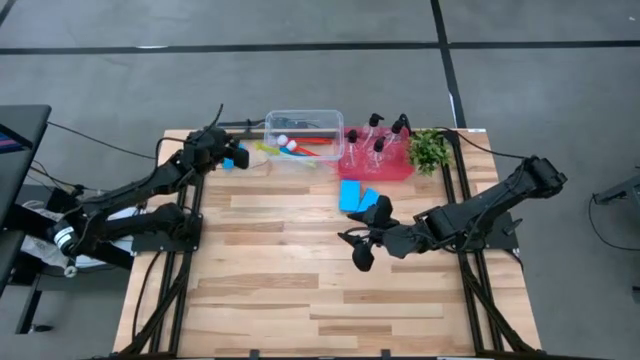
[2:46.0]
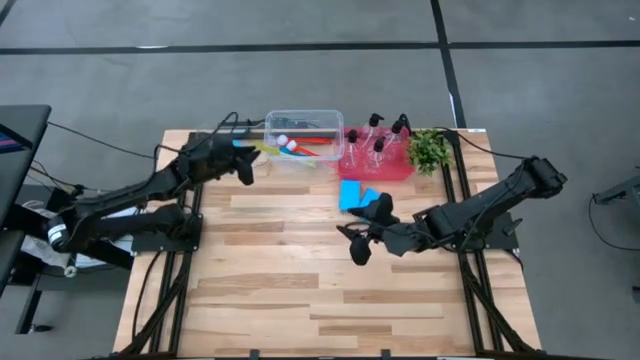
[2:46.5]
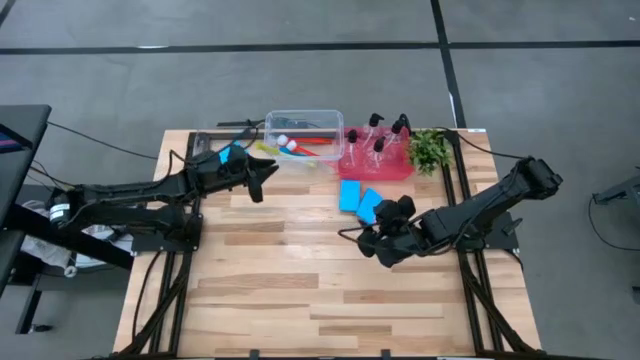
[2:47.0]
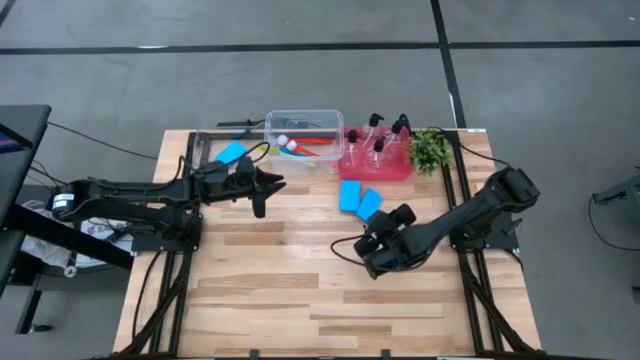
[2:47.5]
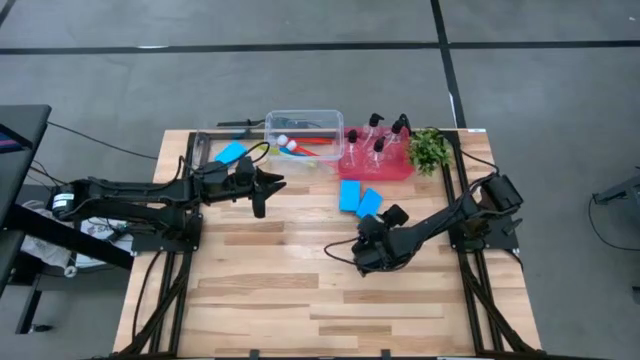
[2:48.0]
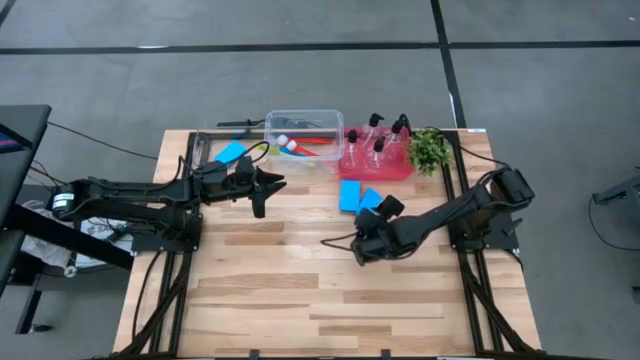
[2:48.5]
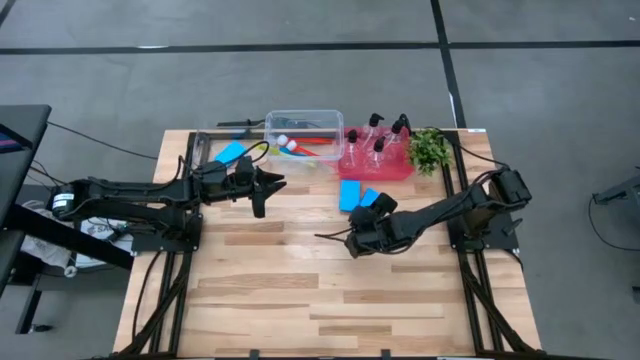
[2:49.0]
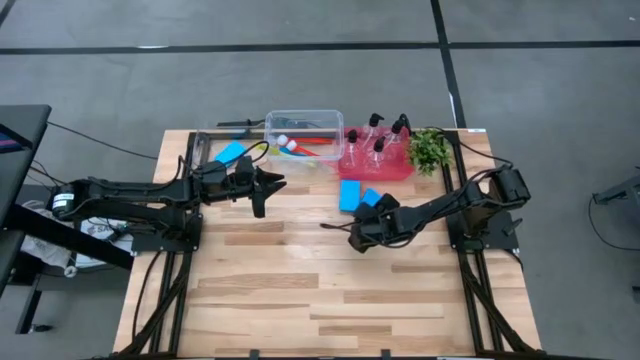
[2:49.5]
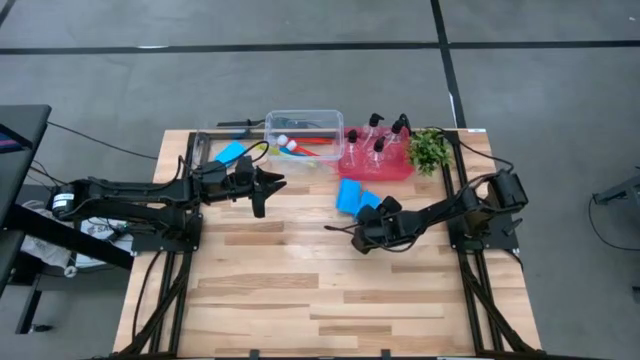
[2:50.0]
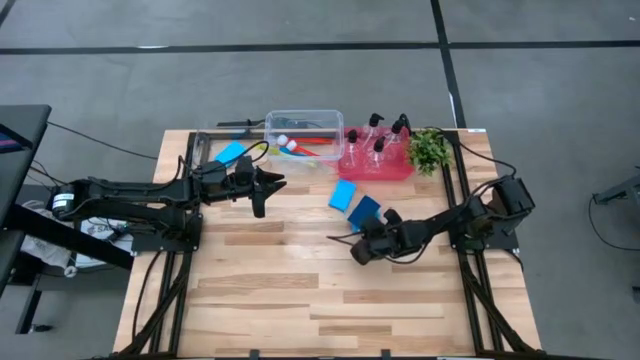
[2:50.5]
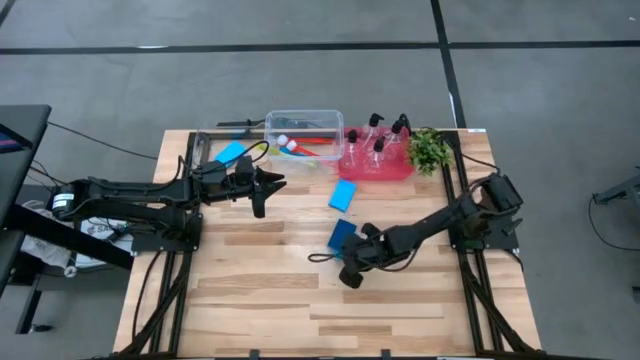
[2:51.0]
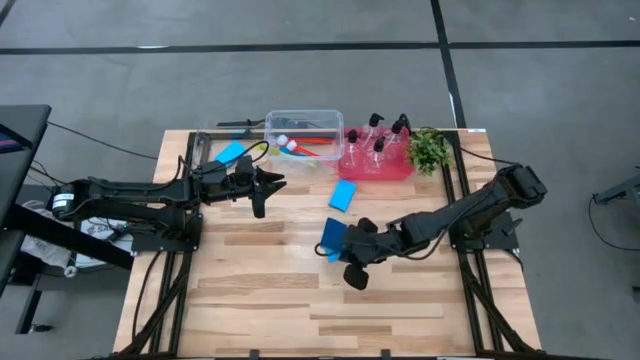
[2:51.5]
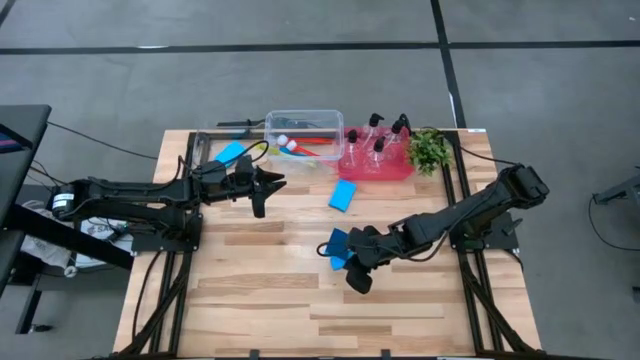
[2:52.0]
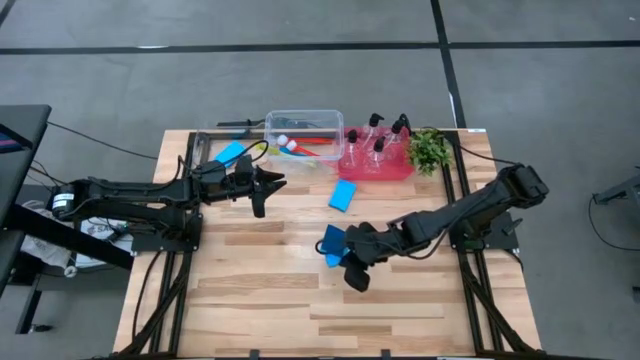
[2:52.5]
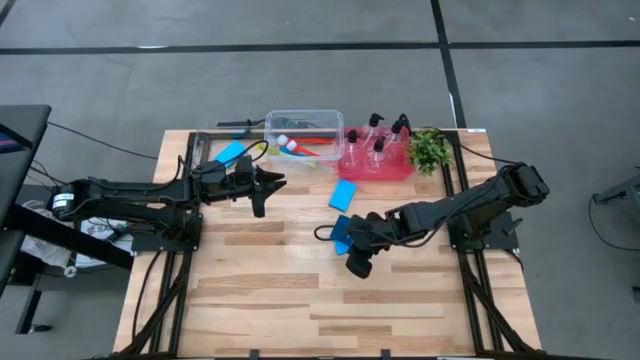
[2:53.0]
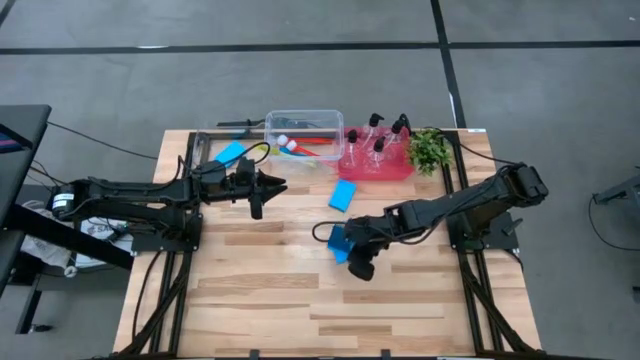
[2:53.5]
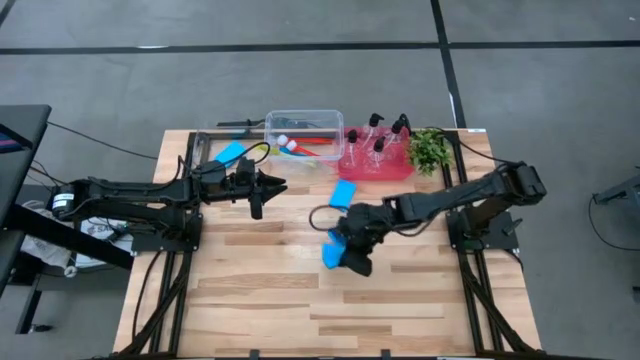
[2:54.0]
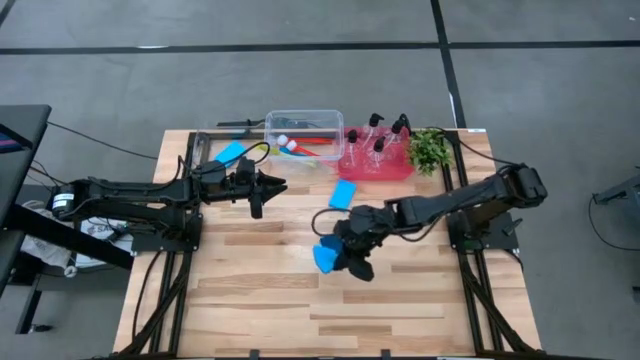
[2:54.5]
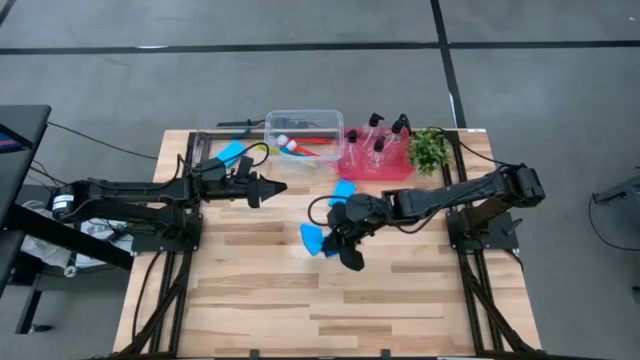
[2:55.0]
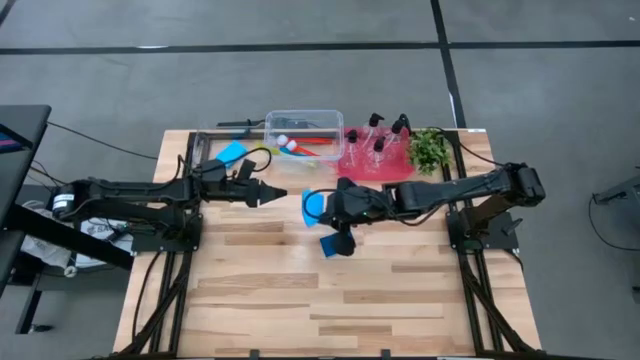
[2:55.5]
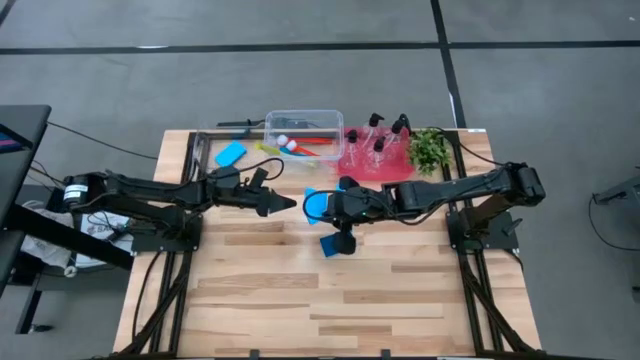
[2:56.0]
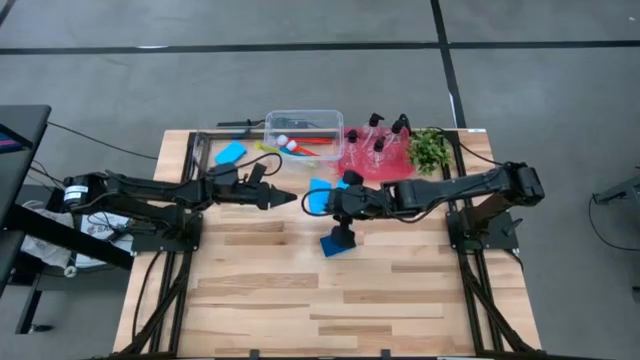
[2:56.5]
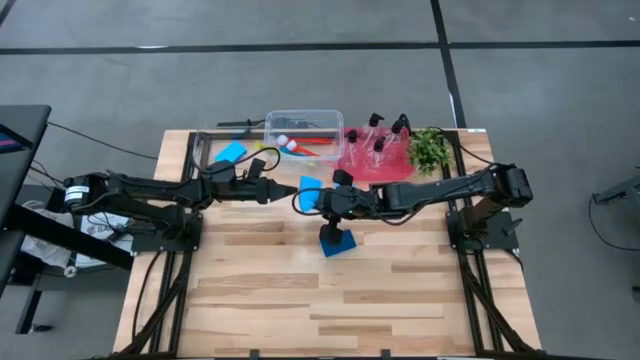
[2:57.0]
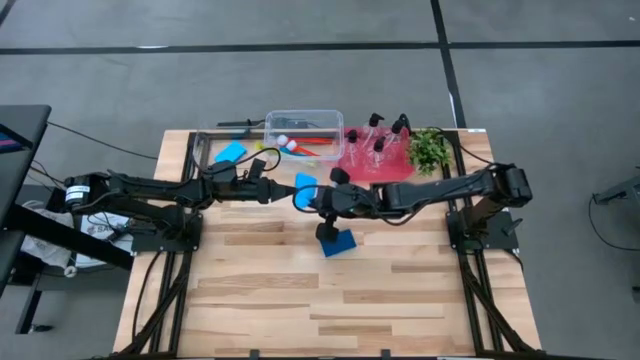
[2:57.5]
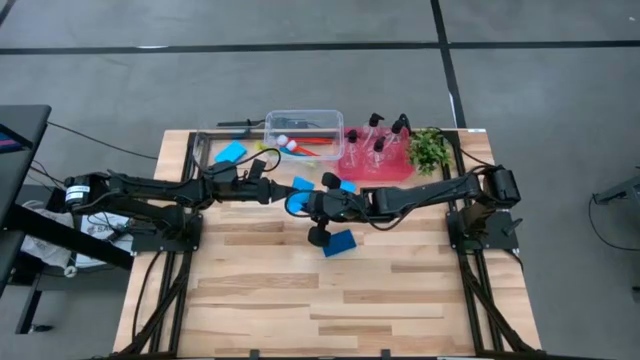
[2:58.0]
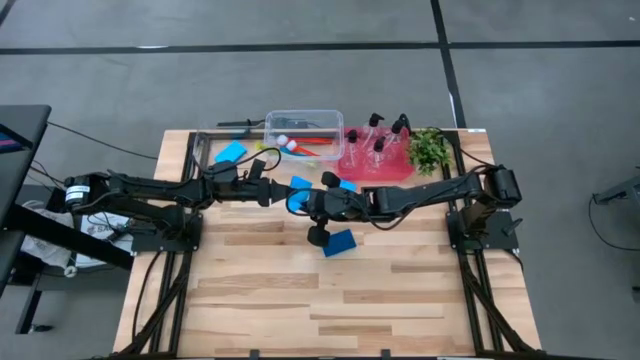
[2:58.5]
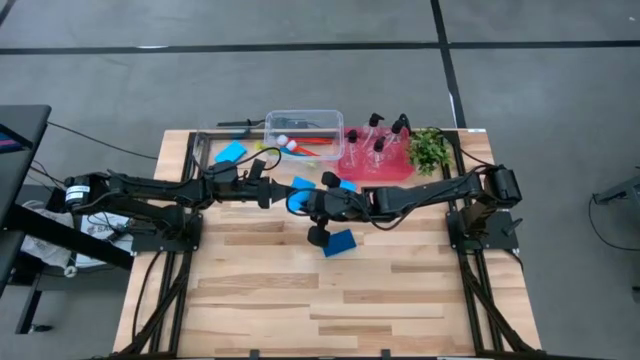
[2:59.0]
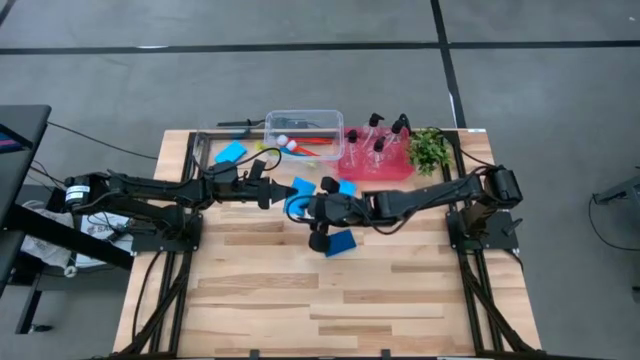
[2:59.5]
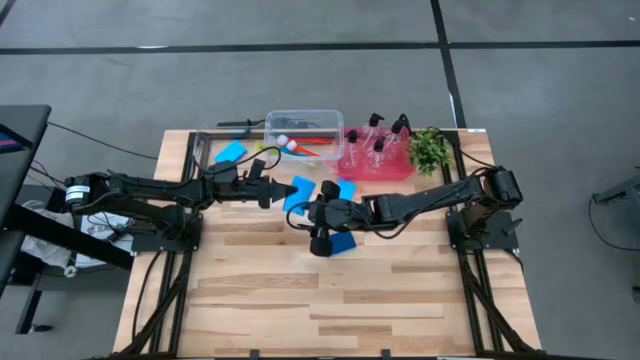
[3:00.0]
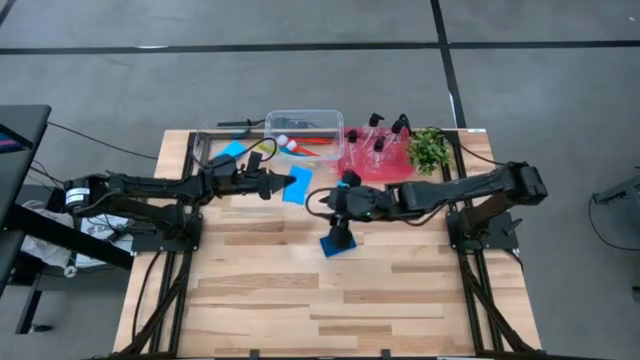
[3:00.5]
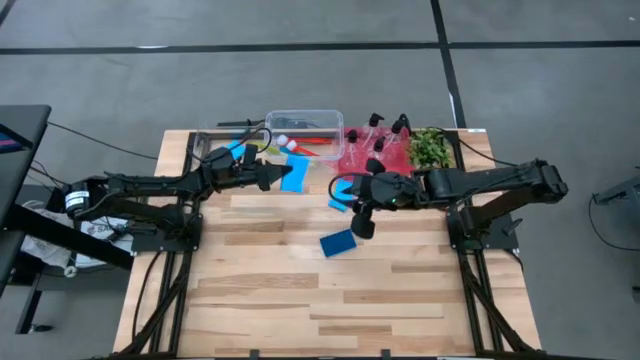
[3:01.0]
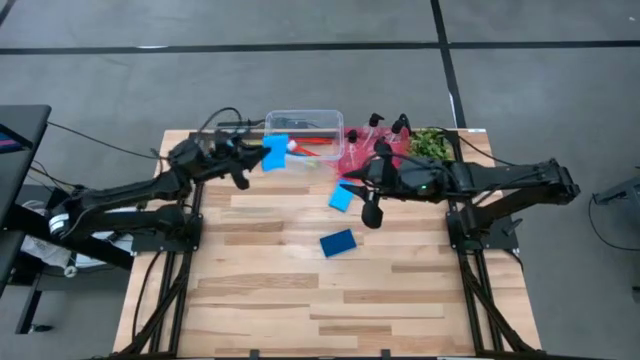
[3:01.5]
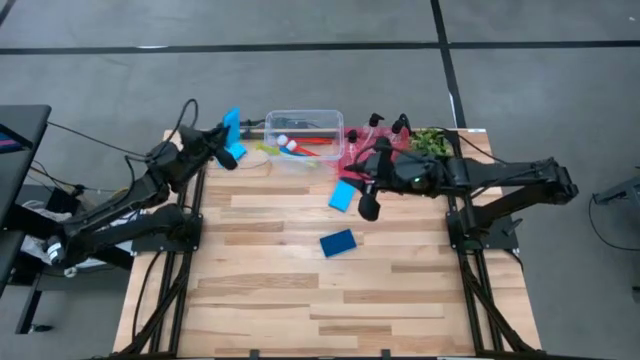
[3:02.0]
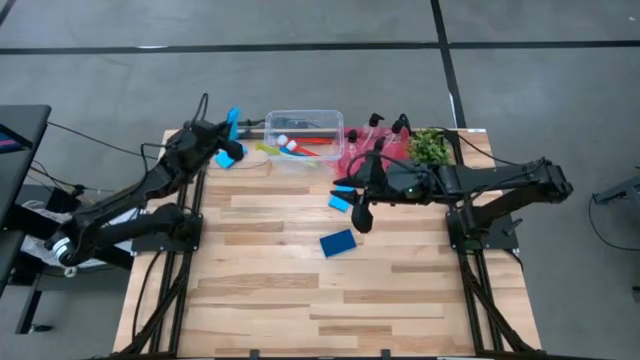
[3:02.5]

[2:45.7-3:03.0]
Task: Pick & Place Kitchen Sink Supplies
Put the blue sponge into the transparent bin

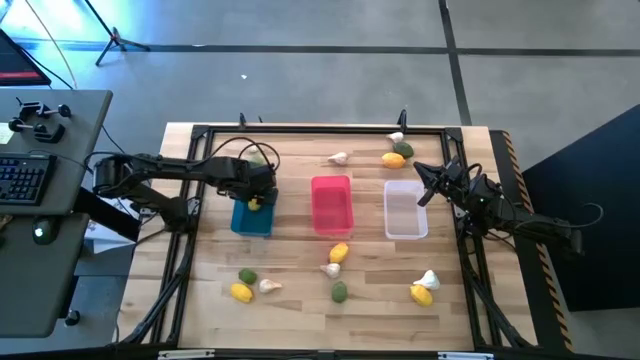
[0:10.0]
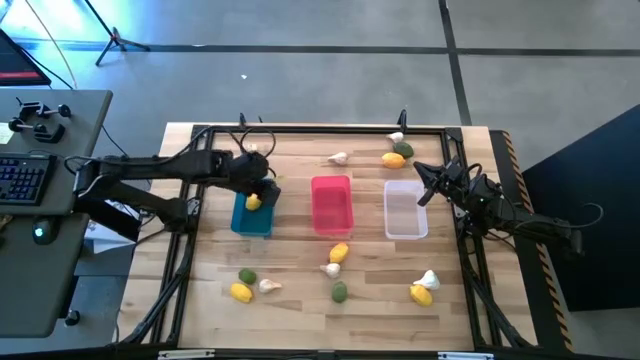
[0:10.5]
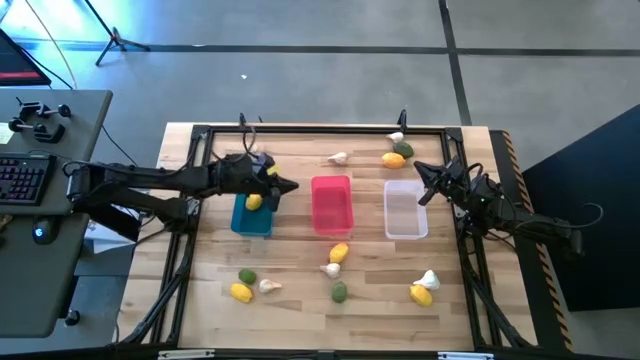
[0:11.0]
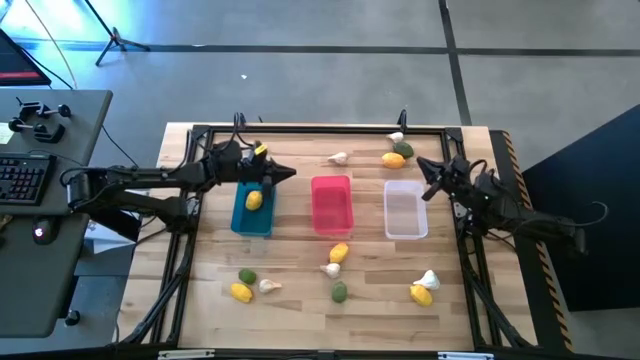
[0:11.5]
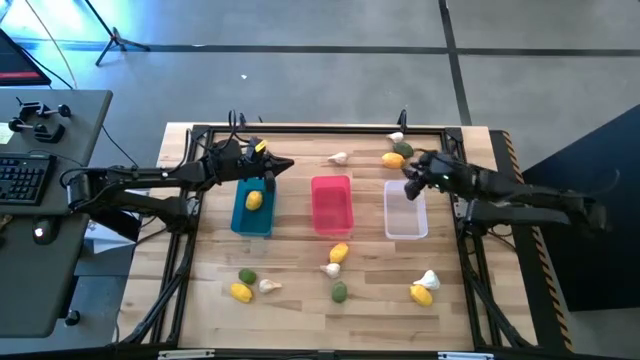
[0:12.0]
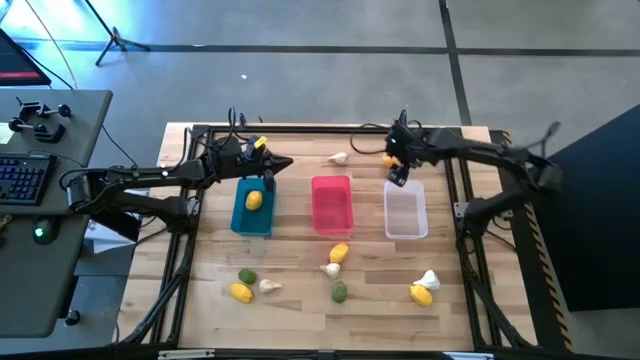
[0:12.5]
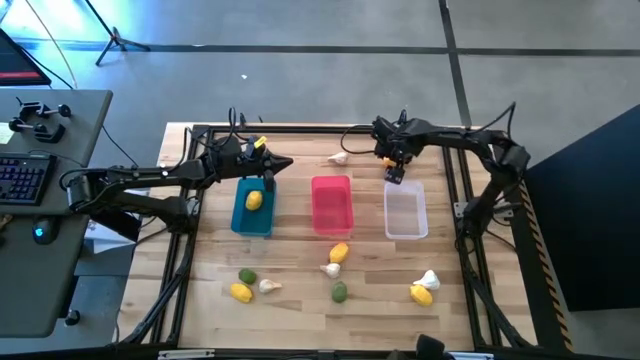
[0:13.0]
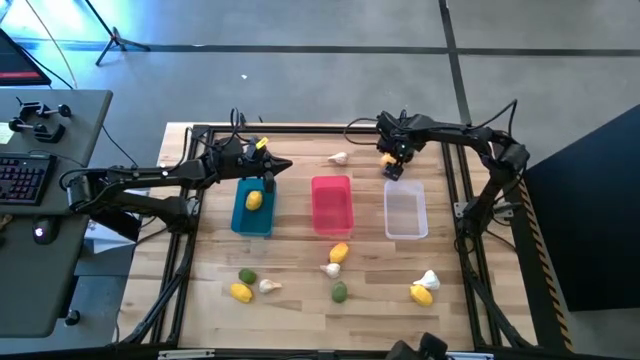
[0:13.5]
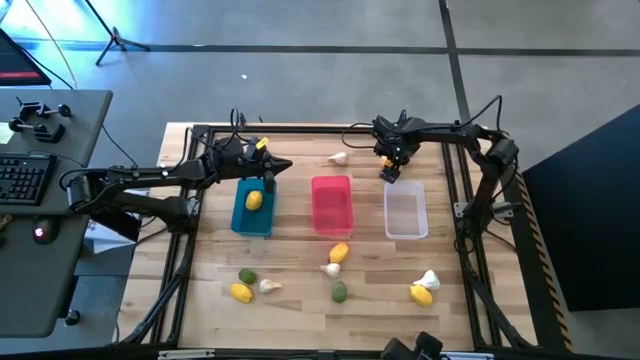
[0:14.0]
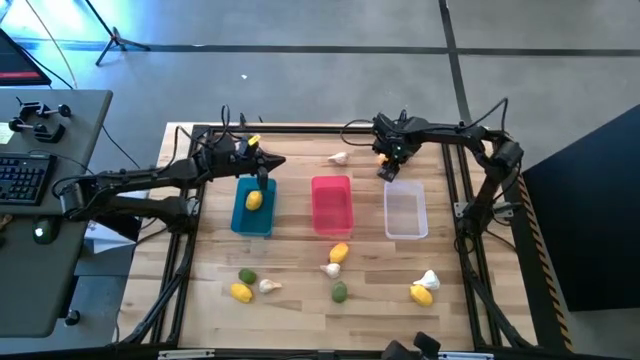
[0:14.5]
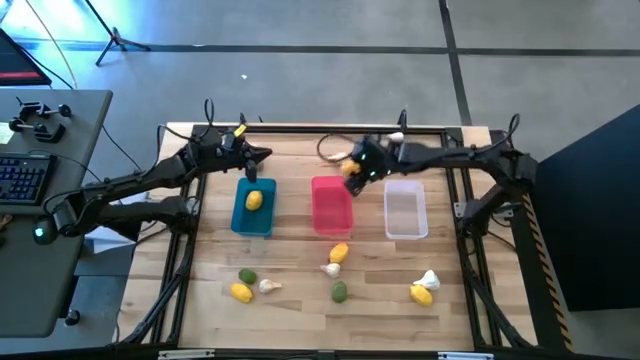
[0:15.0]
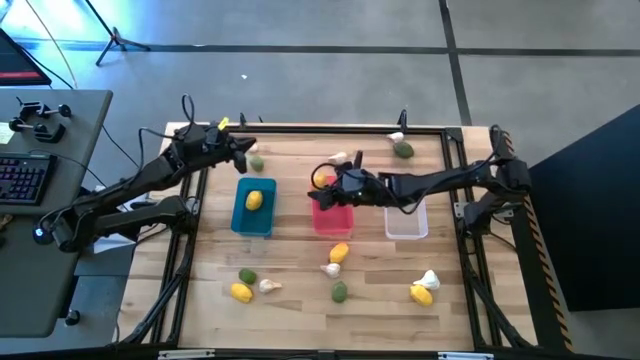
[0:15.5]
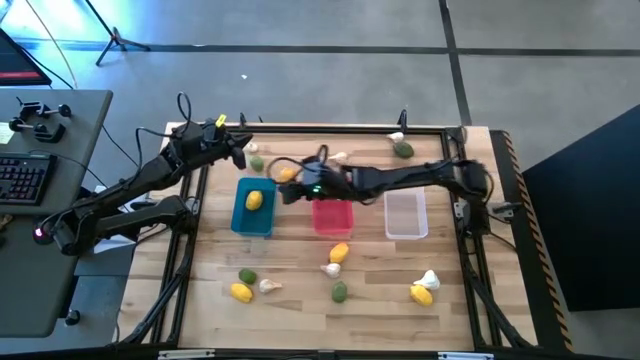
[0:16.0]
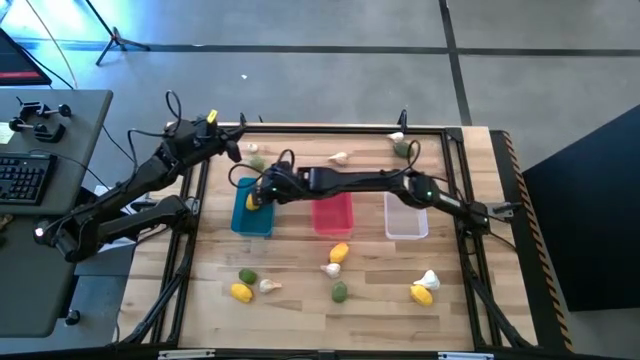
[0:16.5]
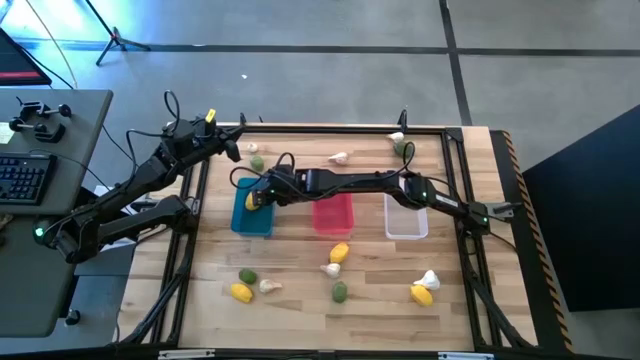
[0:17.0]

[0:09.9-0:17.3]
Task: Sort produce into baskets
Put the top yellow lemon into the blue bin
